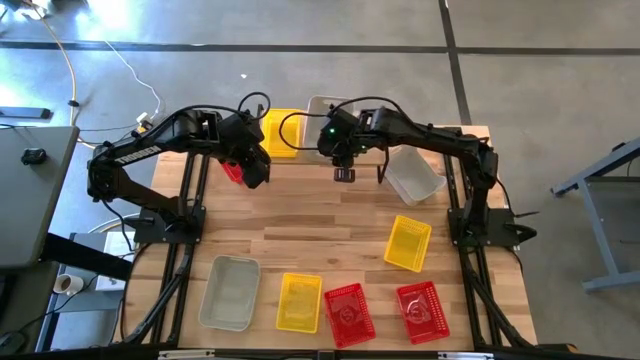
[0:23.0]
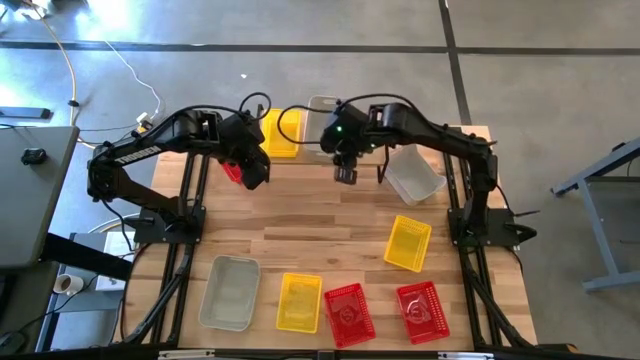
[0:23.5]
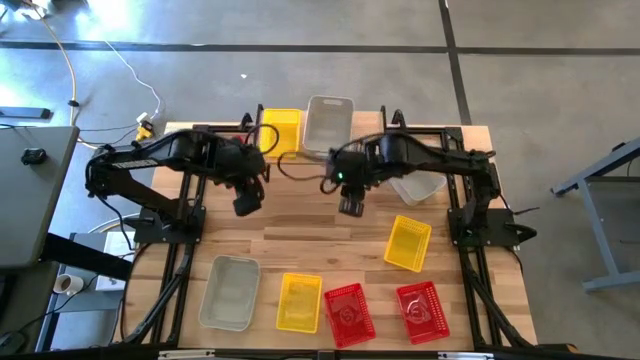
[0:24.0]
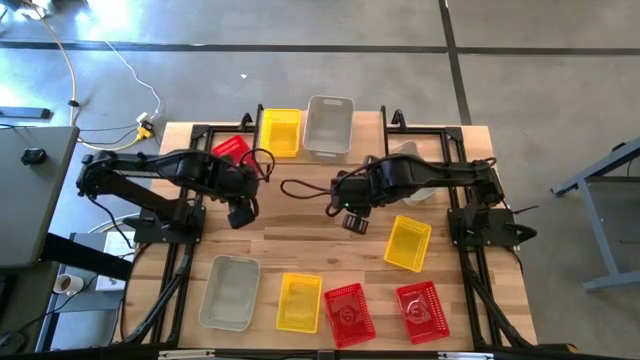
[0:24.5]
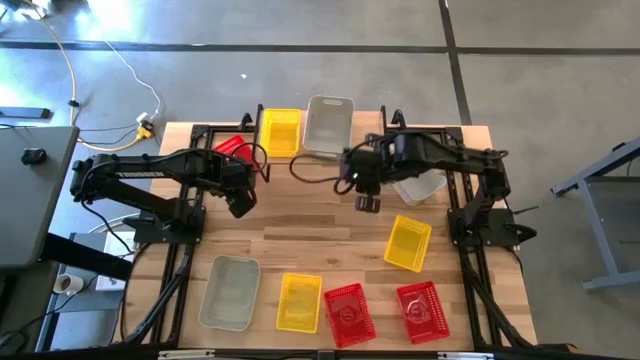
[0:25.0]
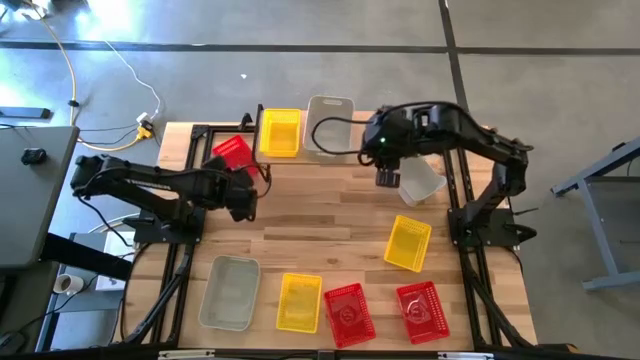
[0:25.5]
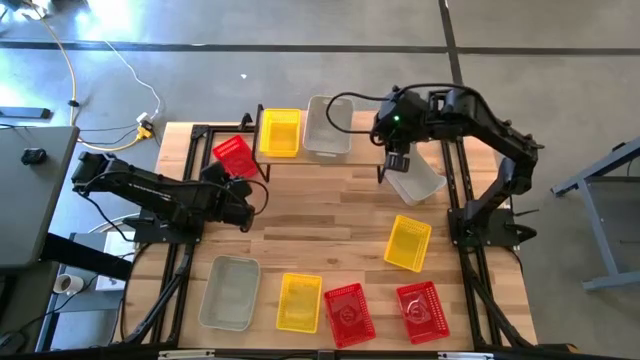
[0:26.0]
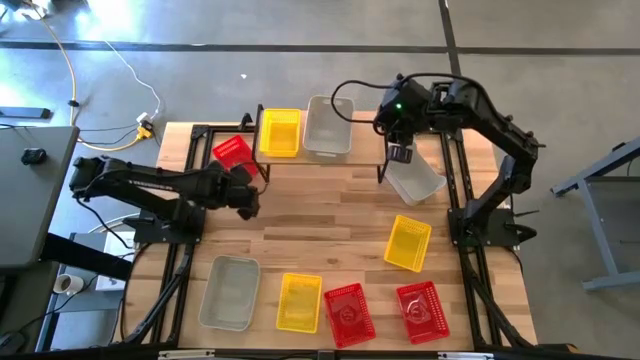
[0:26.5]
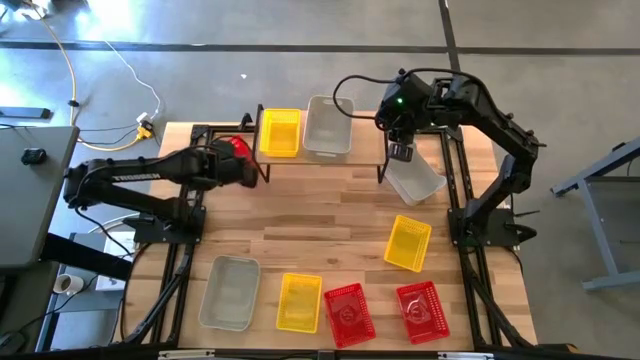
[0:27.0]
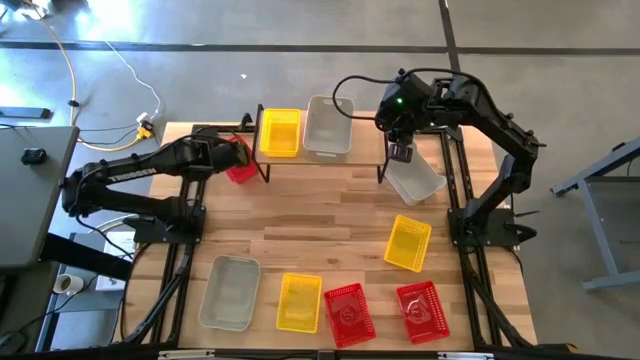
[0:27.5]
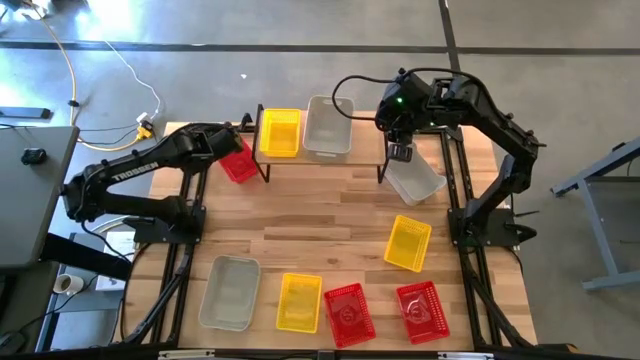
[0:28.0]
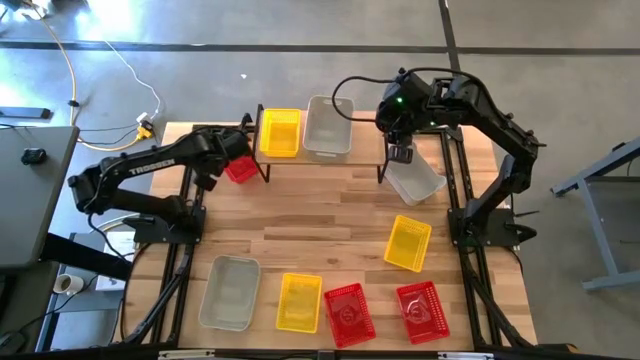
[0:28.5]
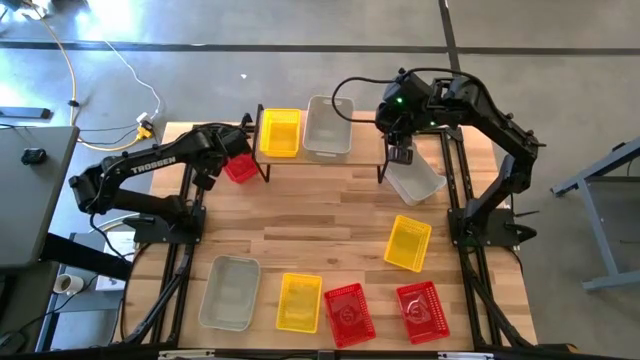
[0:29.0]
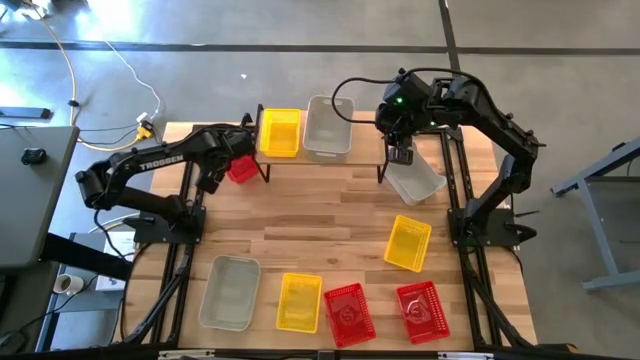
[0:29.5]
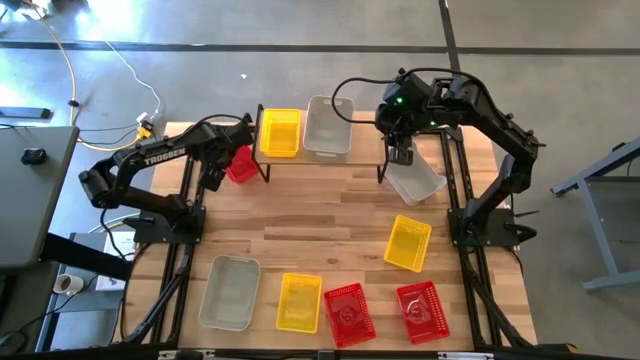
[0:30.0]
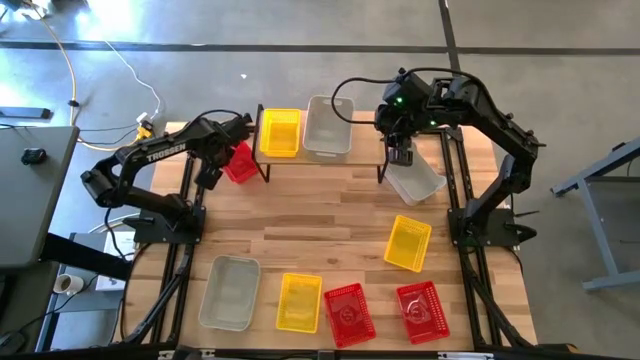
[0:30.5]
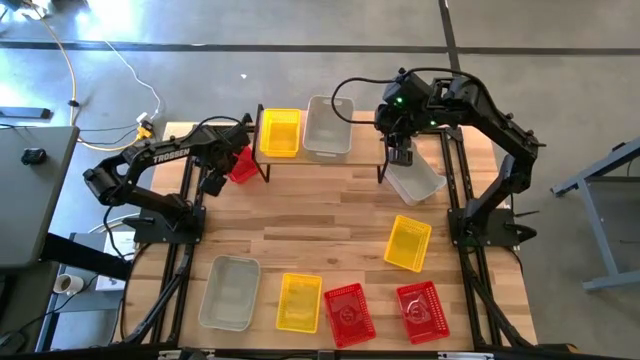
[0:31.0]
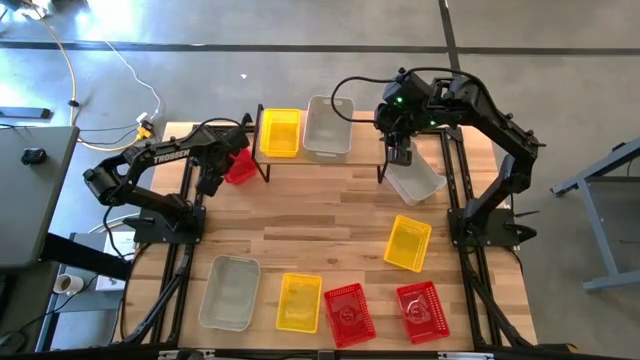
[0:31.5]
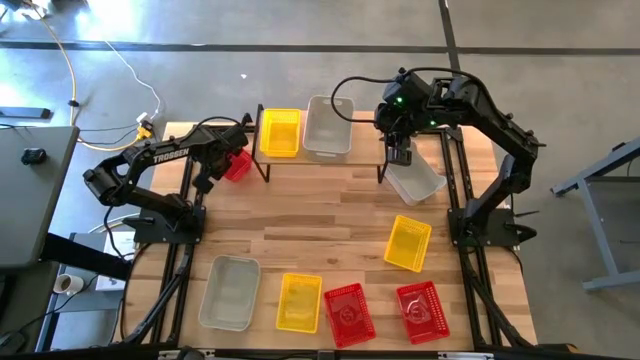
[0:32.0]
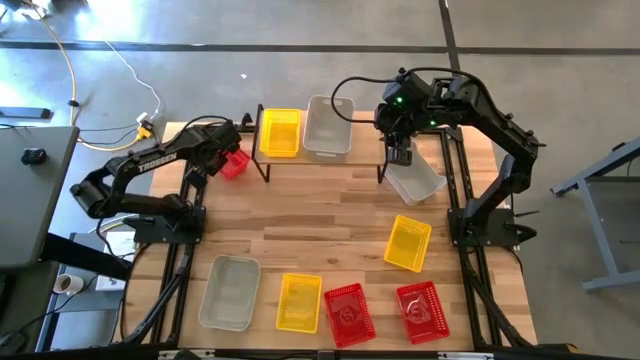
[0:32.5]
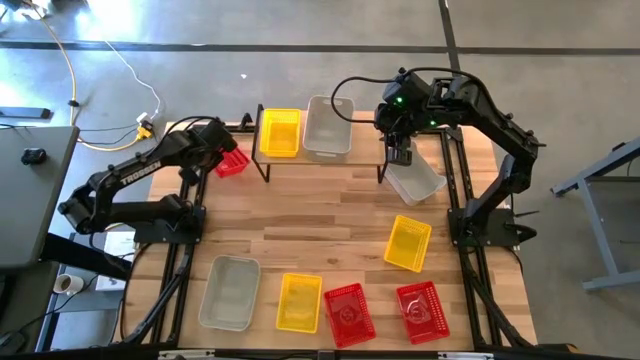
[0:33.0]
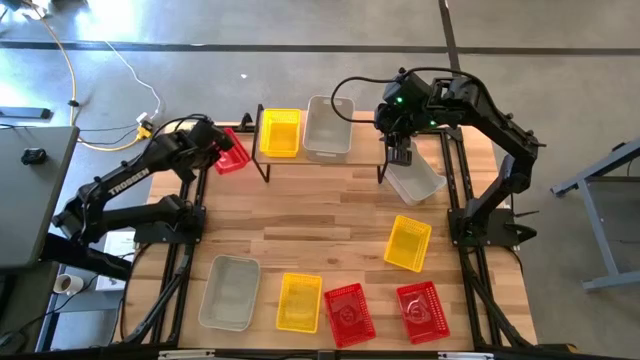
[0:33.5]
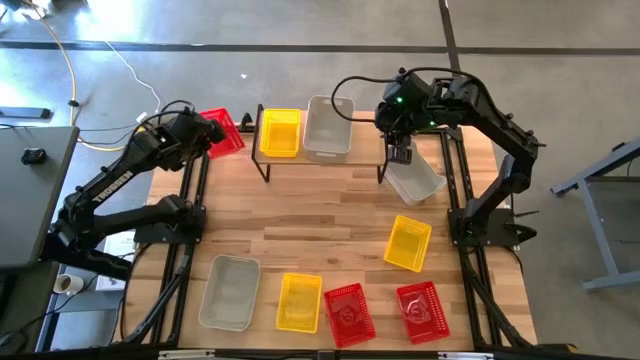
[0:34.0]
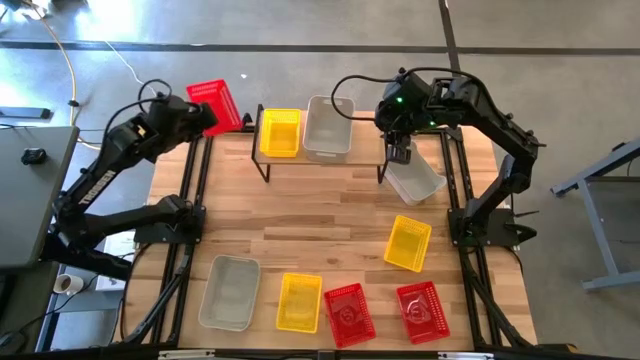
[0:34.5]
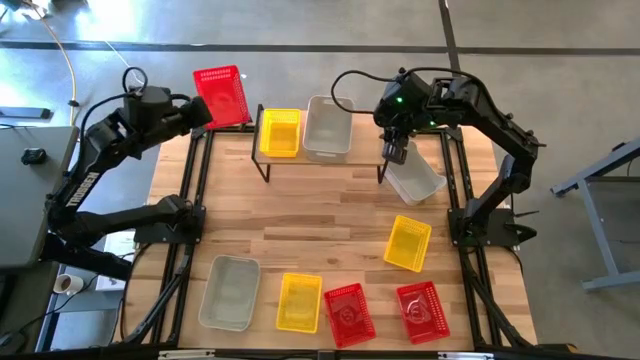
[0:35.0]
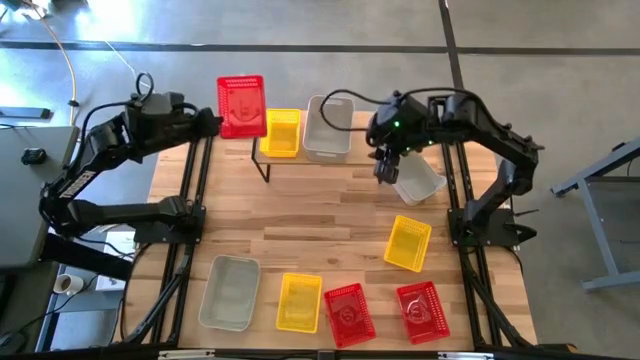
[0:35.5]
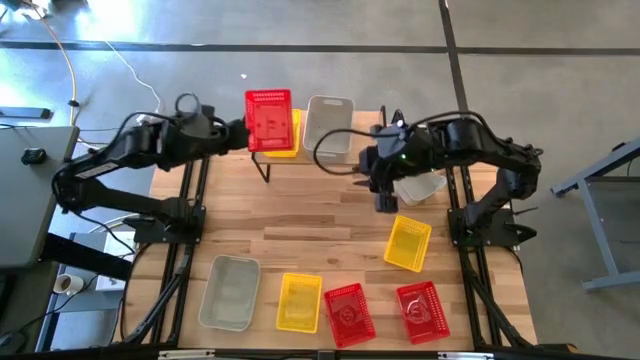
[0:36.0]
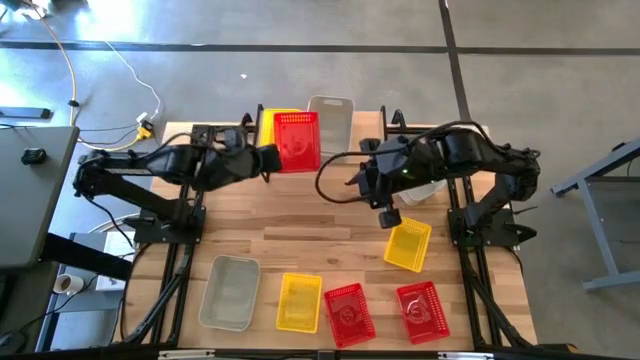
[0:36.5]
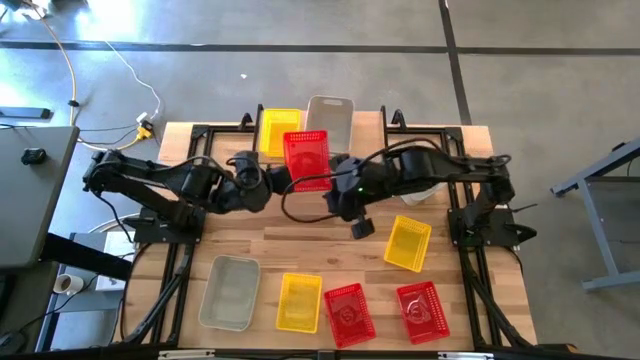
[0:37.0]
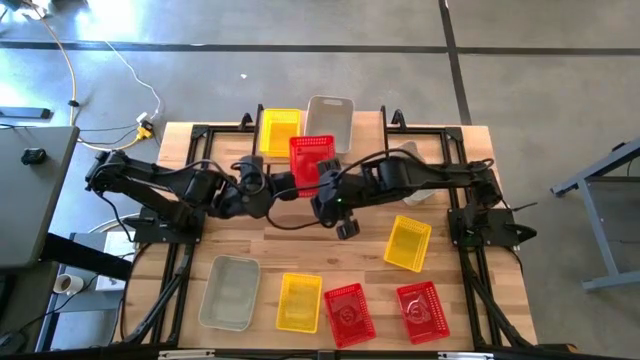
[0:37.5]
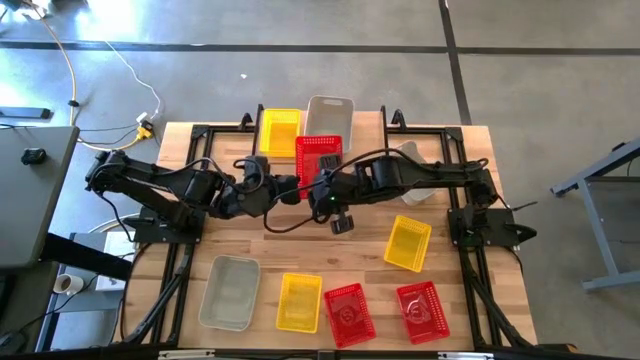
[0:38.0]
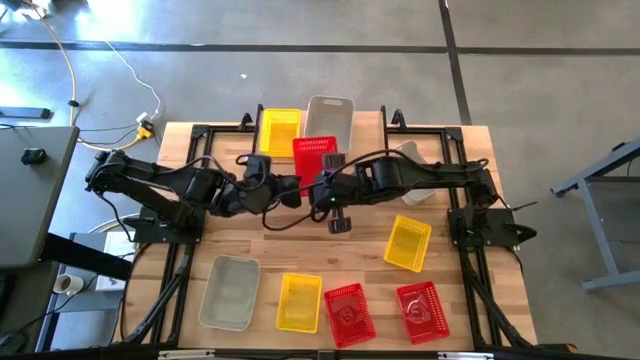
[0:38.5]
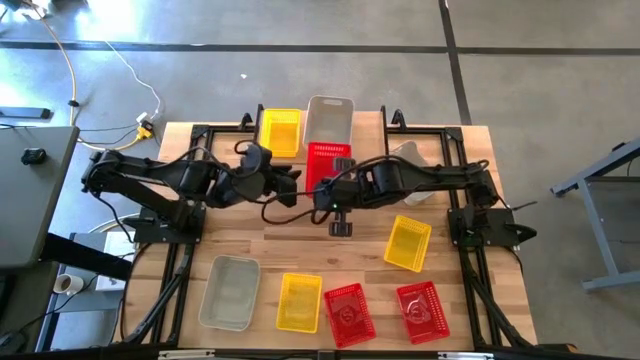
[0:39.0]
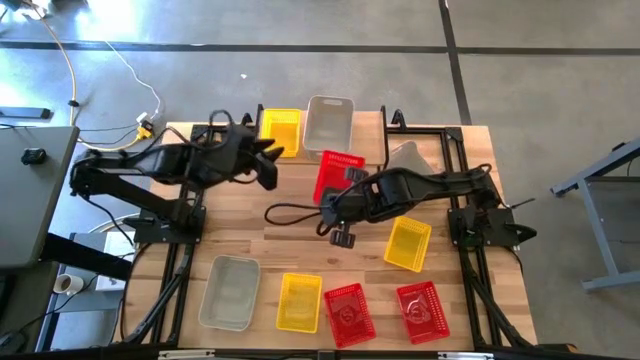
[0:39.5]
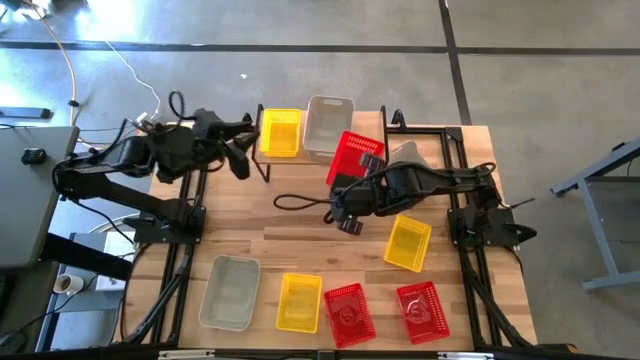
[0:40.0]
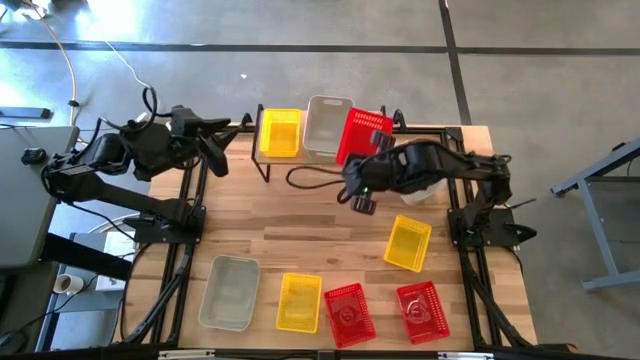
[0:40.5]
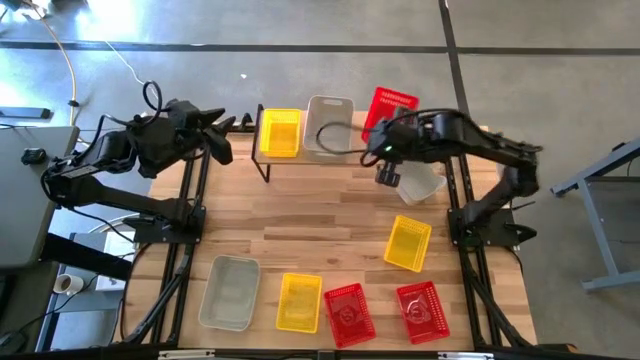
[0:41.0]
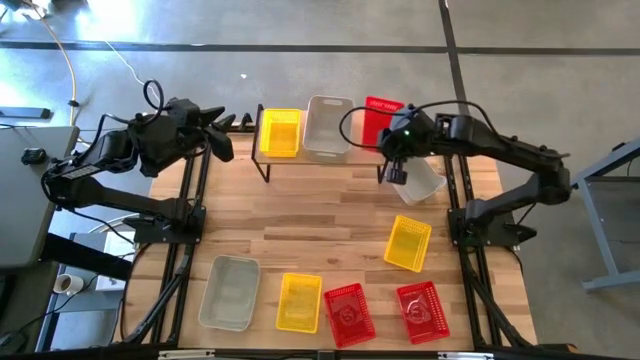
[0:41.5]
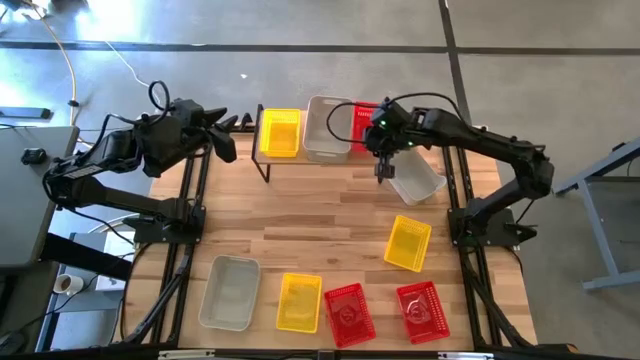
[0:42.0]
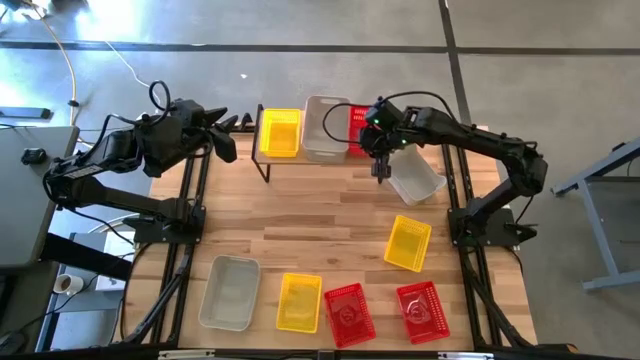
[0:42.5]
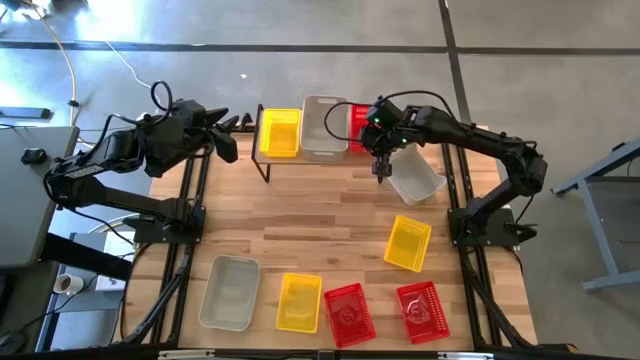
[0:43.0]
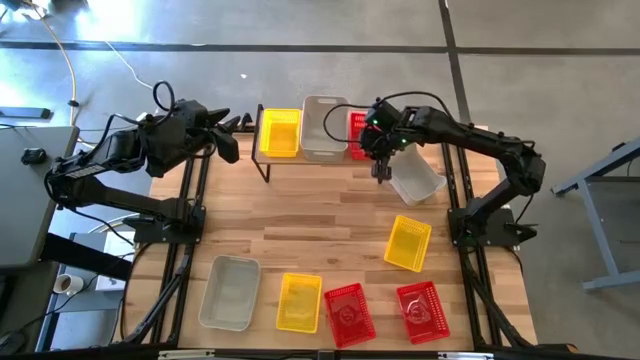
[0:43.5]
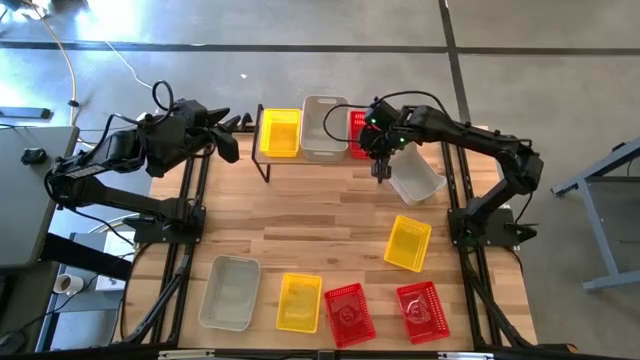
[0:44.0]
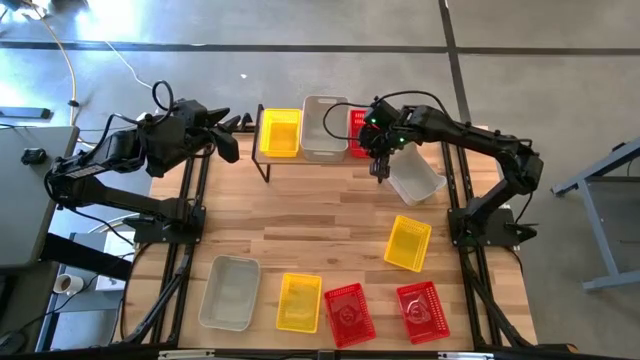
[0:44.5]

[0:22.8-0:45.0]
Task: Stack baskets on shelf by color
Put the top red bin on the shelf
